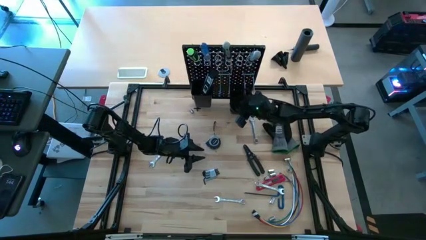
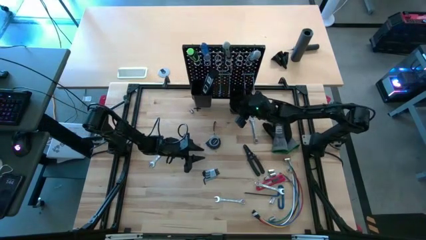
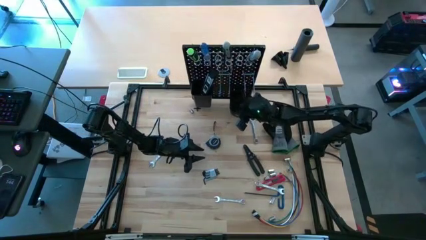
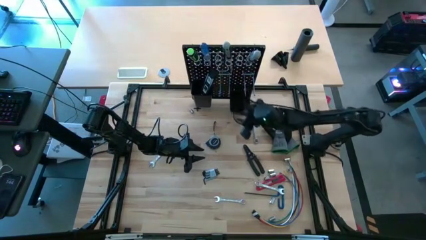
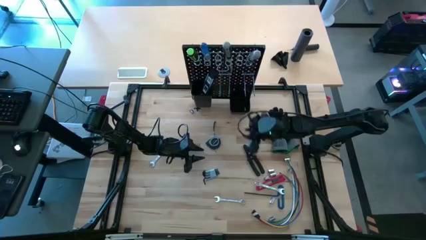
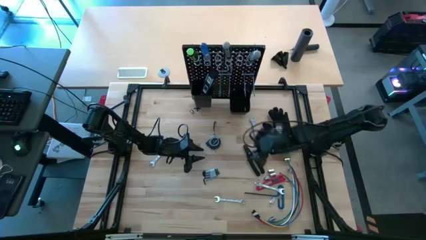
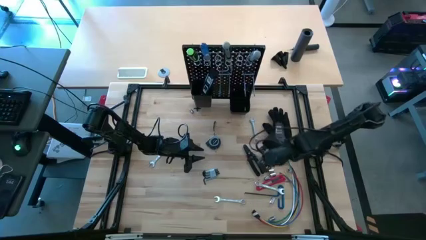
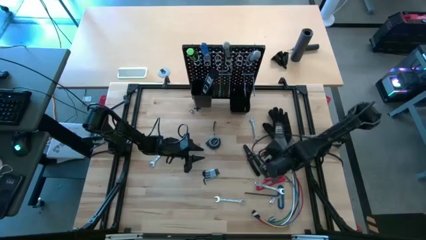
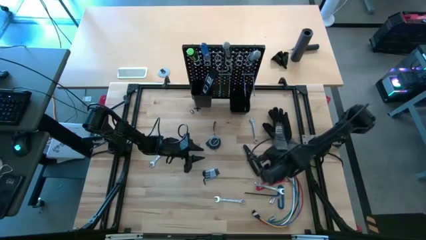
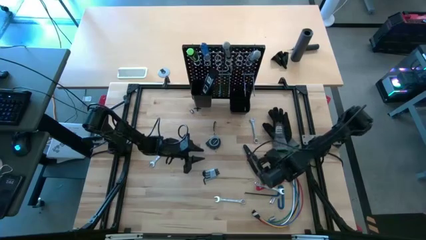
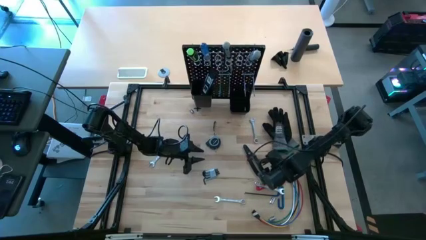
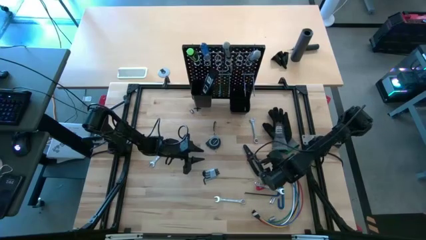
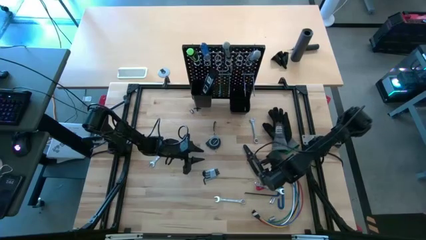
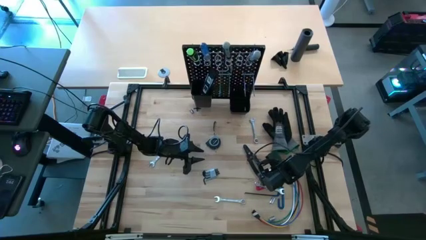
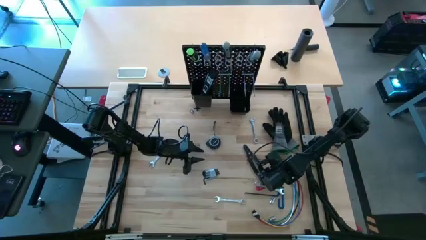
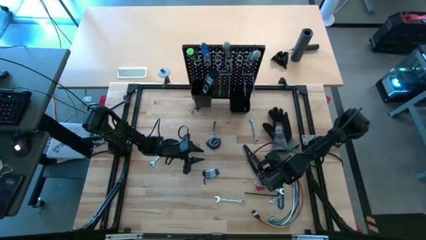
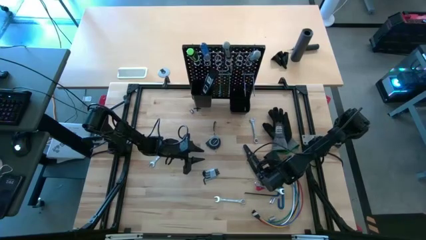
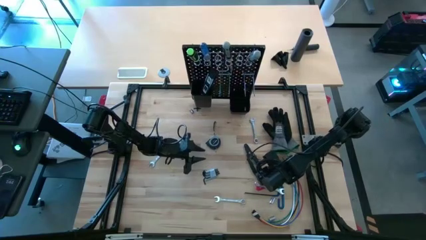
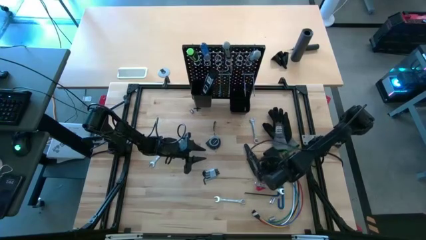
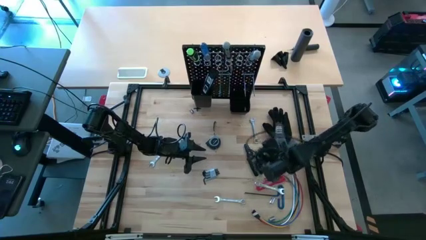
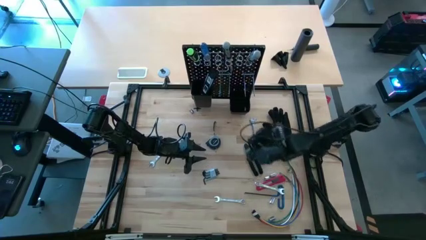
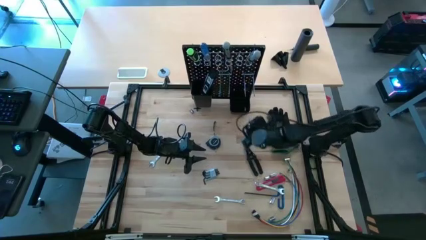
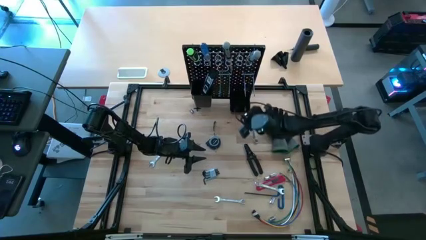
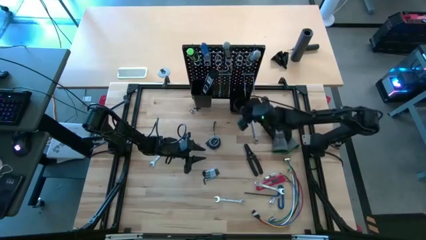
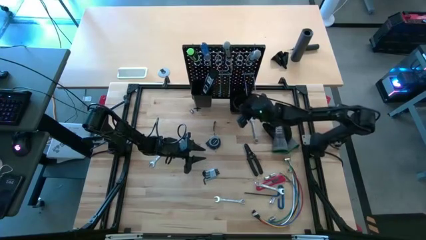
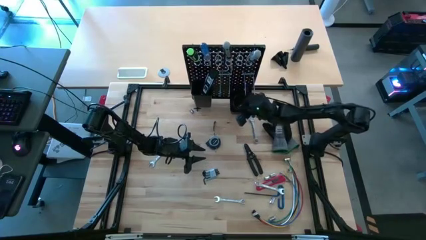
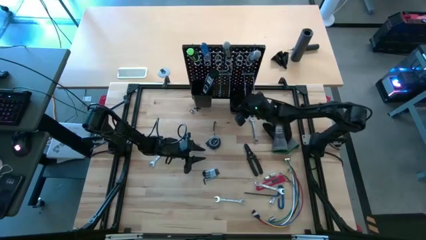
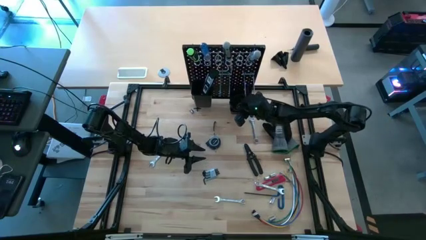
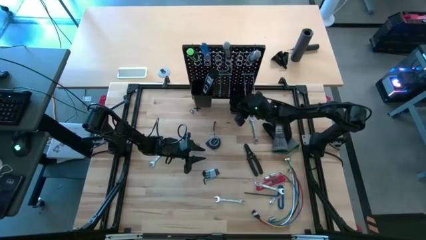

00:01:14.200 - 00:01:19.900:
Task: Hang tools onto peg board
Put the silver socket driver on the right black bin on the peg board

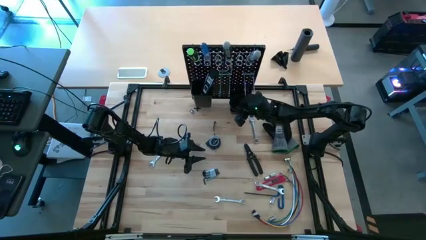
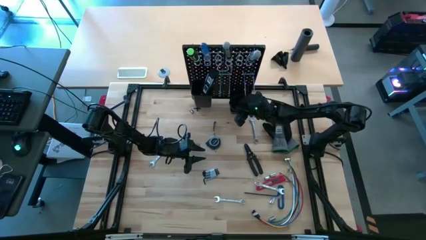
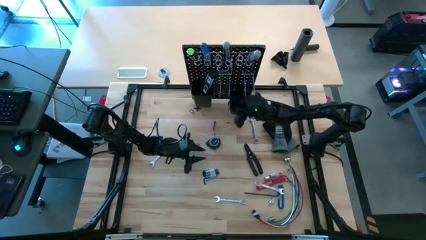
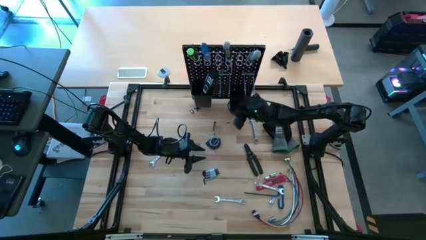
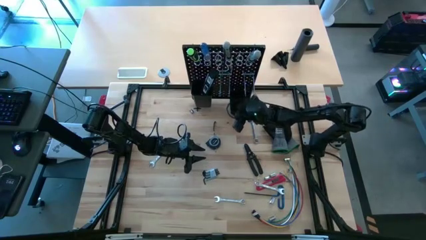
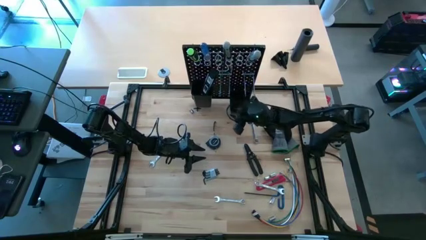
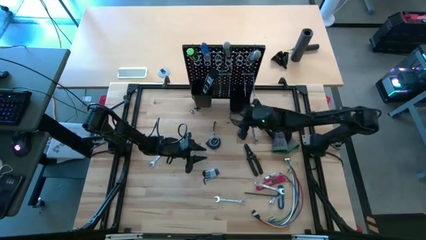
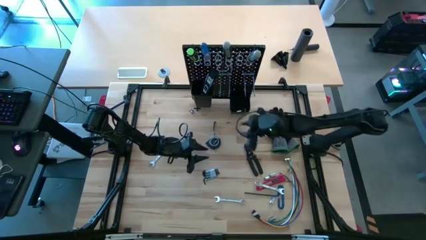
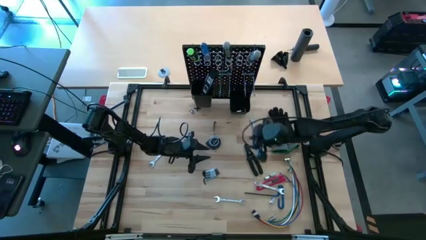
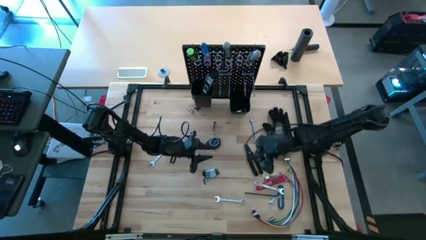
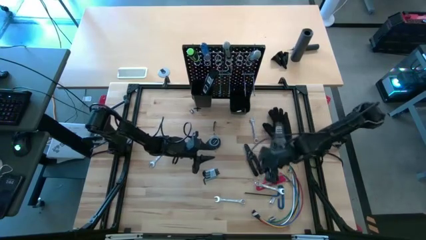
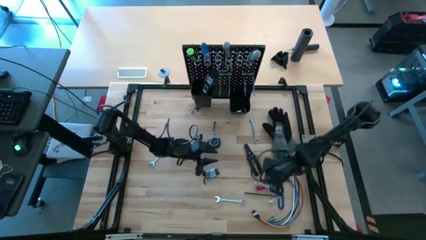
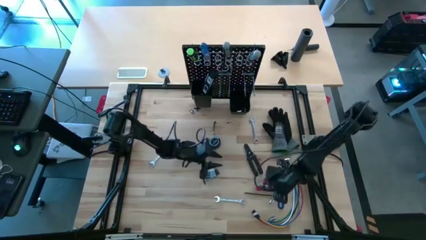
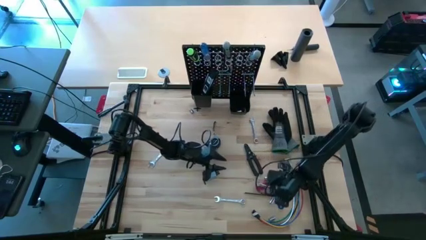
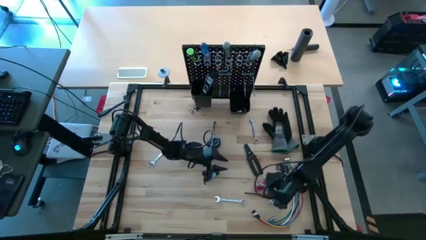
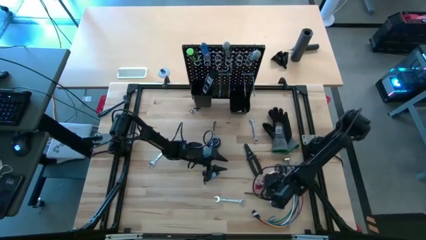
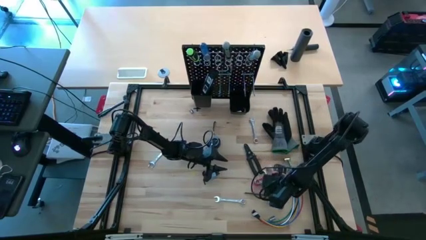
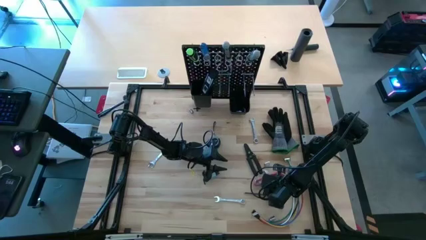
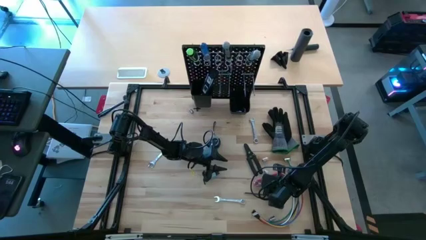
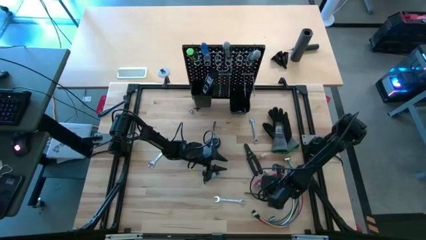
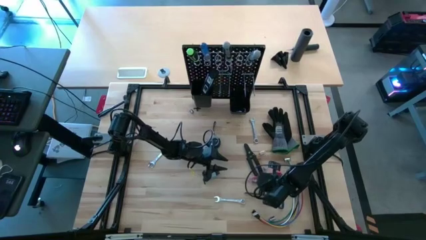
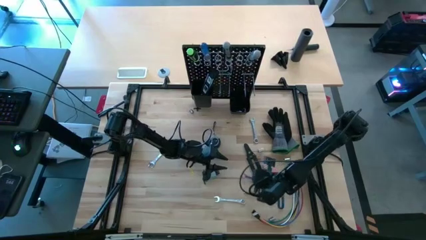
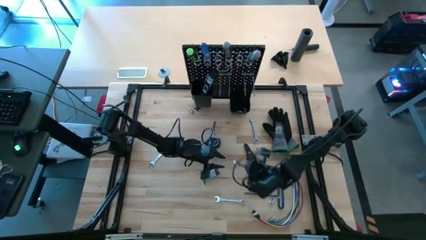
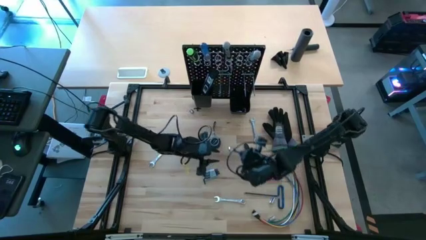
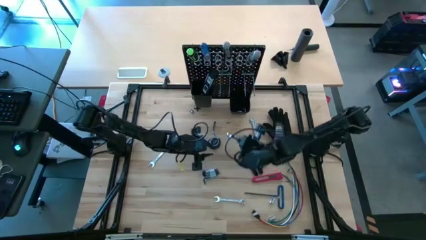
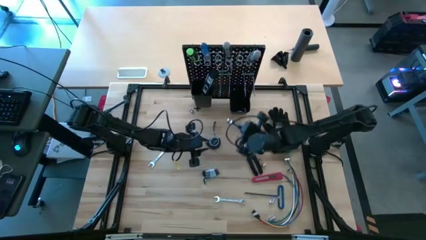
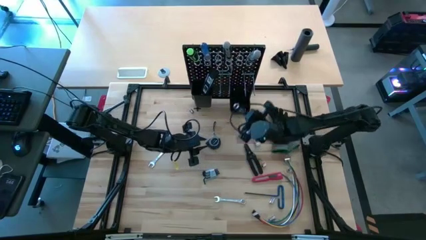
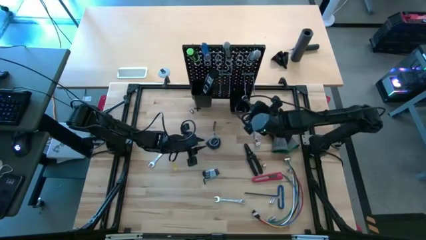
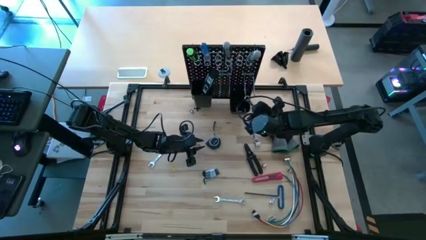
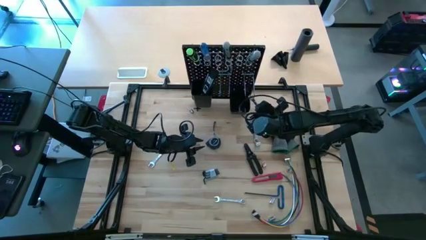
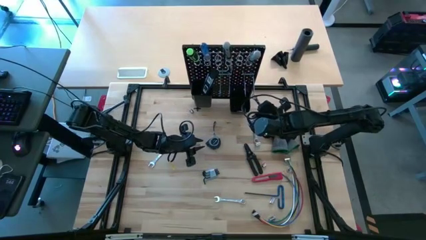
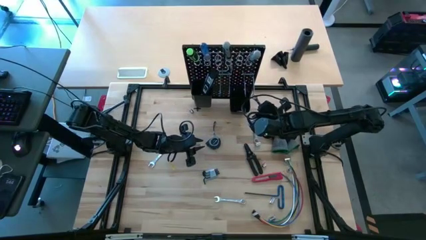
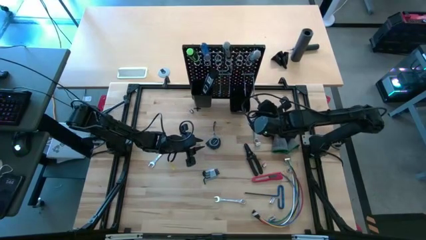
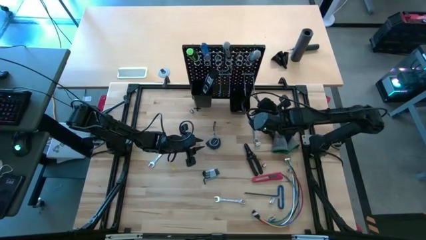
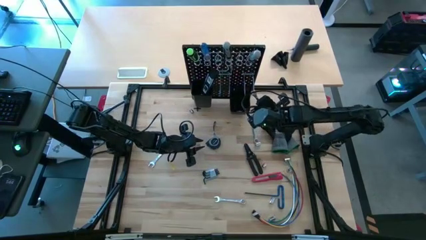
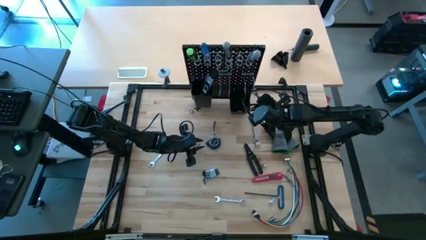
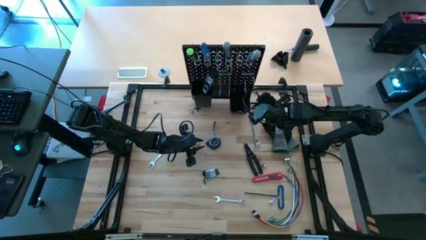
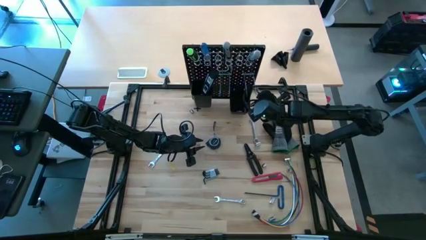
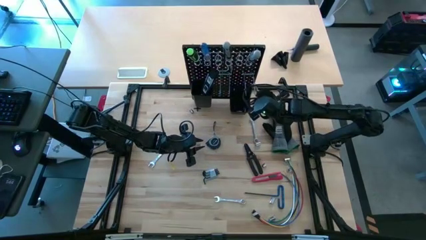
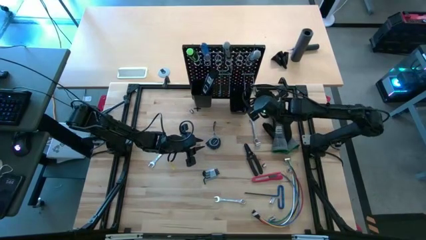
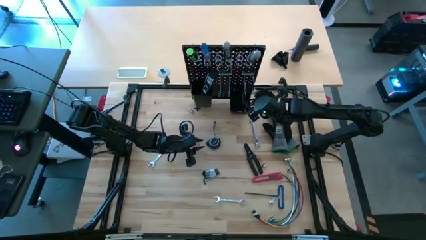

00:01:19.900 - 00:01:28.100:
Hang the silver wrench on the peg board
